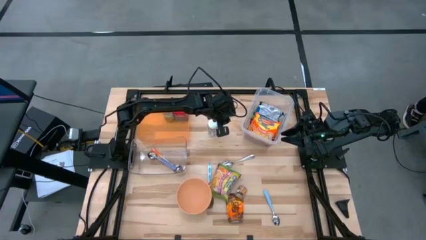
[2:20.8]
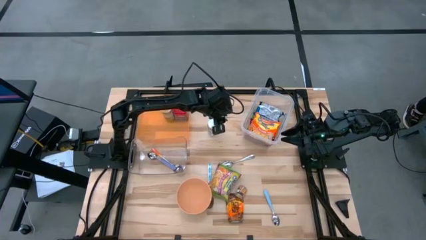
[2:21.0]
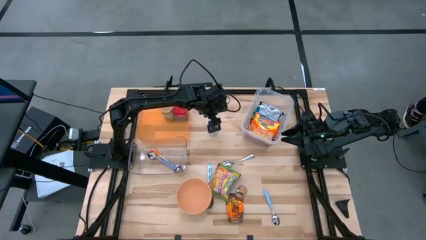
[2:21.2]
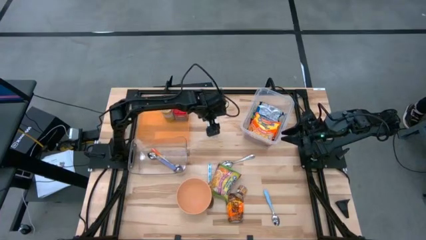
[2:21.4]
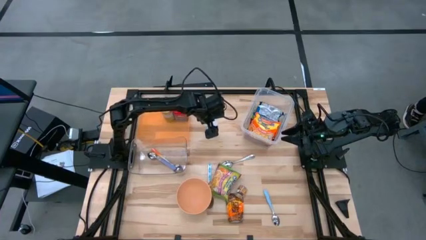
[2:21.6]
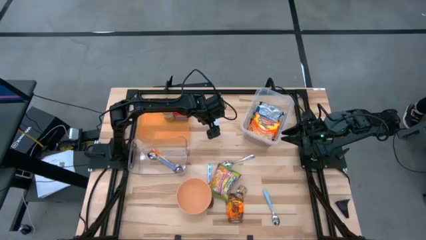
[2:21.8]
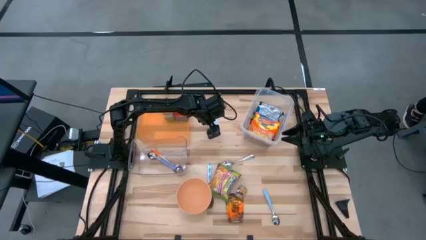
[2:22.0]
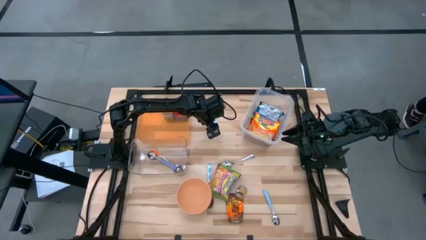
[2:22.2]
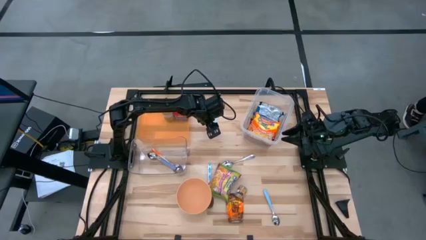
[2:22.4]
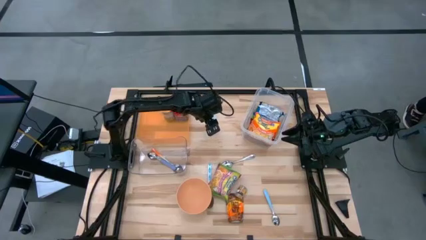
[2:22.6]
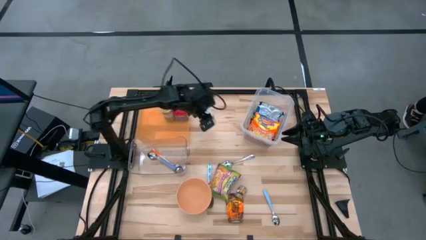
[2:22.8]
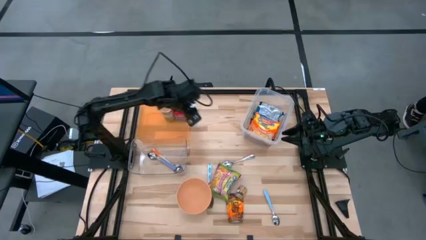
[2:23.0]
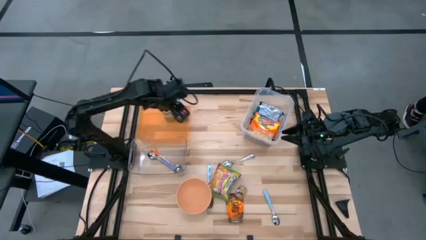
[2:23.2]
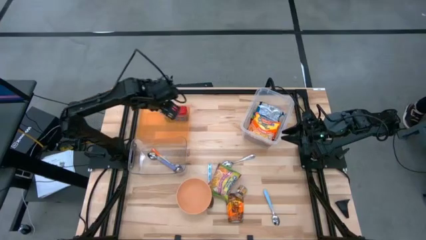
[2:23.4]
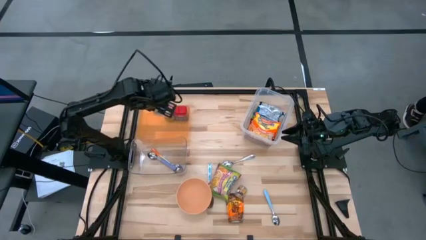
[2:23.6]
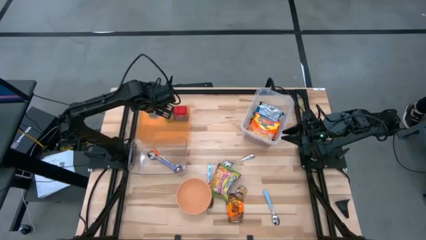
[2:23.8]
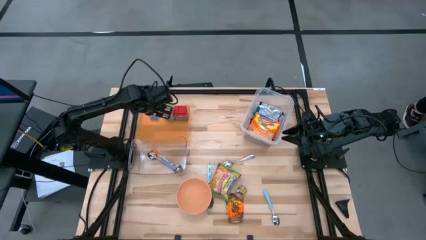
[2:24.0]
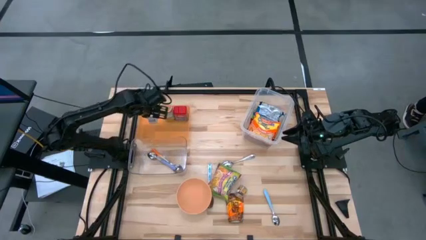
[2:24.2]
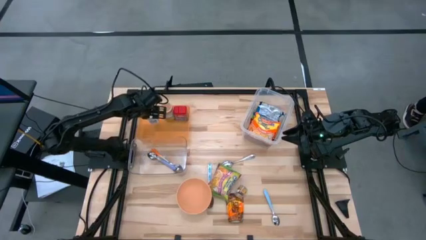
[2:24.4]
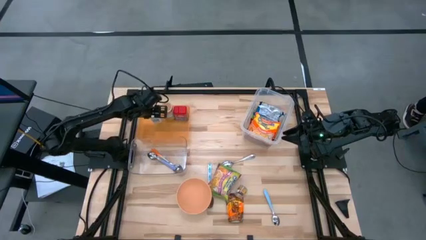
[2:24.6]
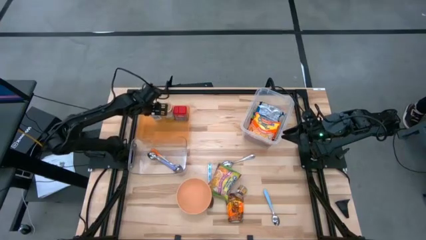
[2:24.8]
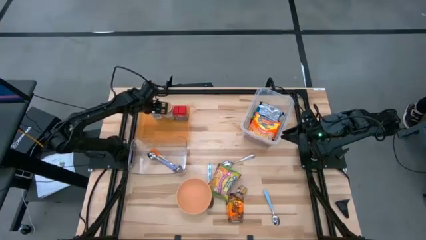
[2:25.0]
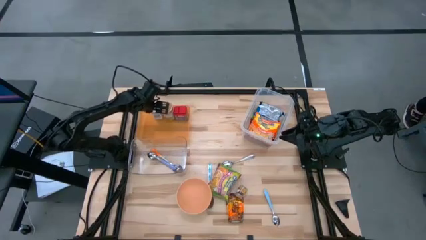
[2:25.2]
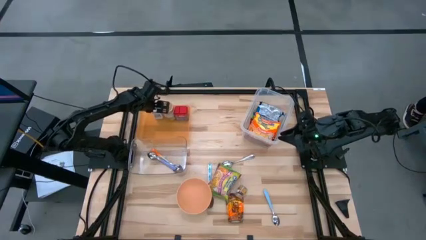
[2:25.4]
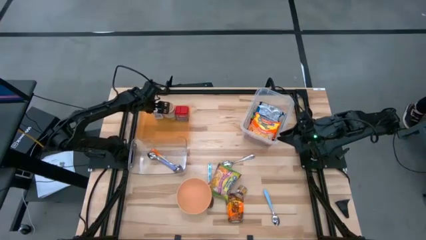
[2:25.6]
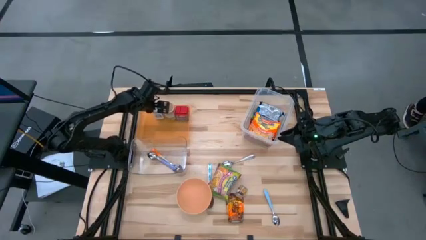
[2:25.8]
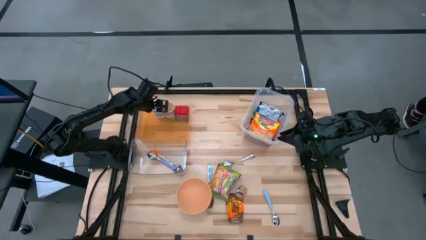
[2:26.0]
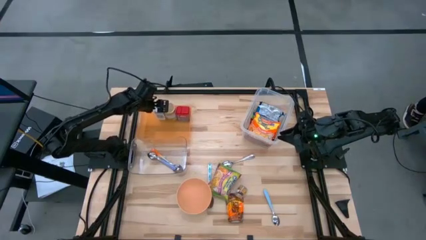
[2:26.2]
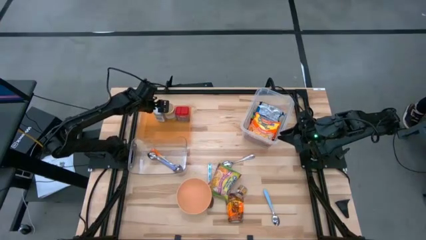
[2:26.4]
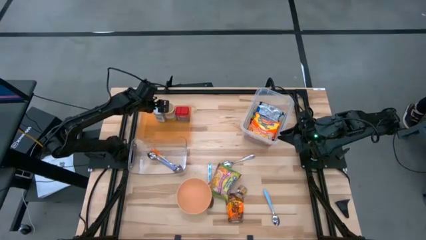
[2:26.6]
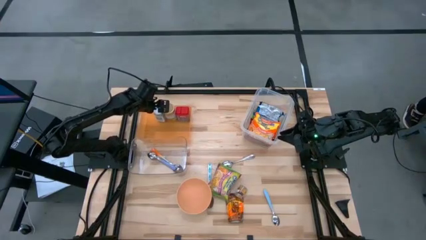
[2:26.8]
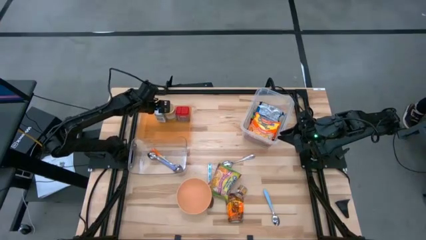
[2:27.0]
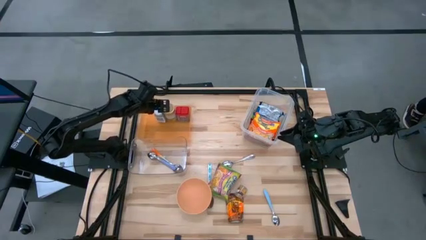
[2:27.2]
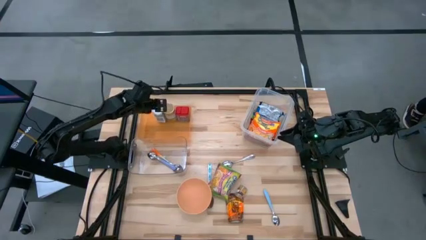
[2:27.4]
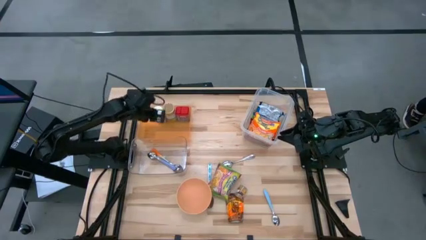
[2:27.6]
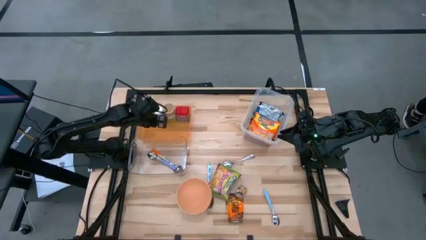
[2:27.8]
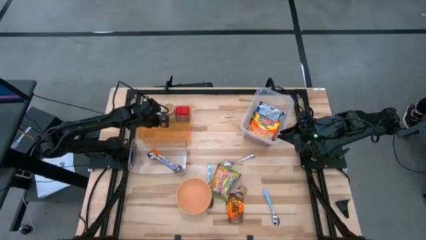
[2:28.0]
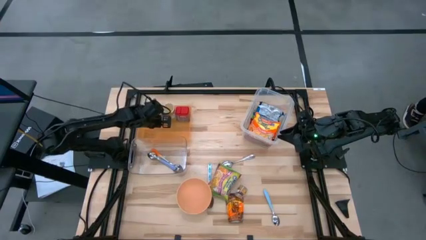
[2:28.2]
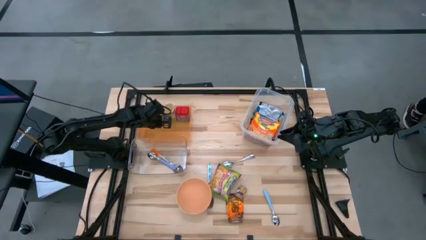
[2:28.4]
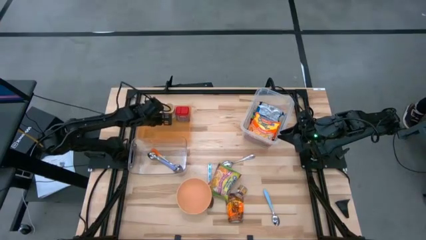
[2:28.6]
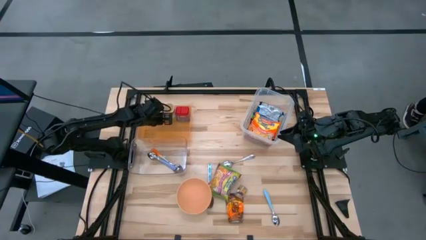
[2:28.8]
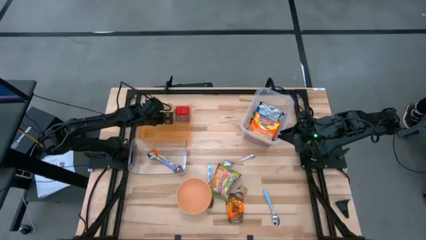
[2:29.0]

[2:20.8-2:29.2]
Task: Pick & Place Food Item
Put the white seasoning bottle into the orange bin

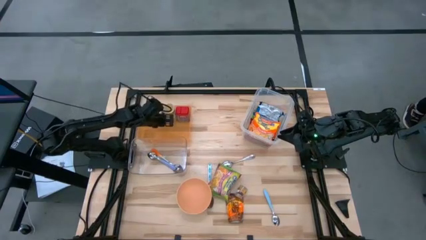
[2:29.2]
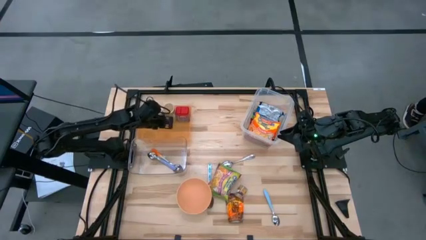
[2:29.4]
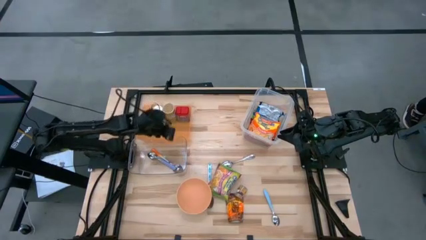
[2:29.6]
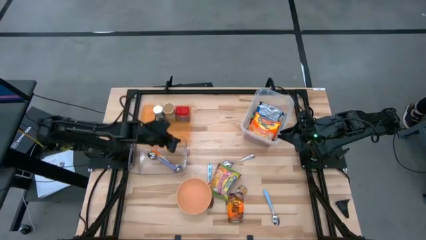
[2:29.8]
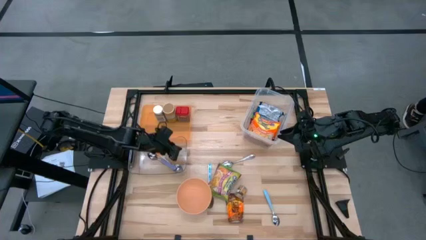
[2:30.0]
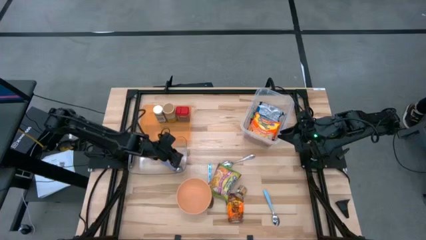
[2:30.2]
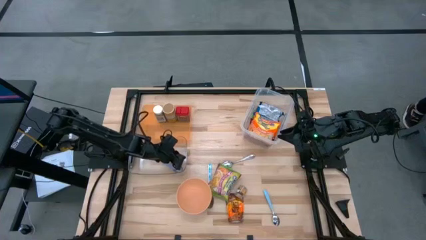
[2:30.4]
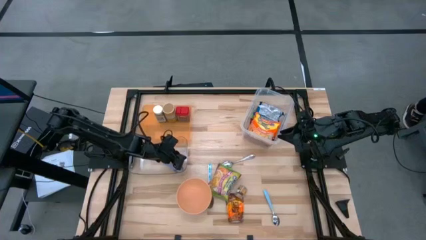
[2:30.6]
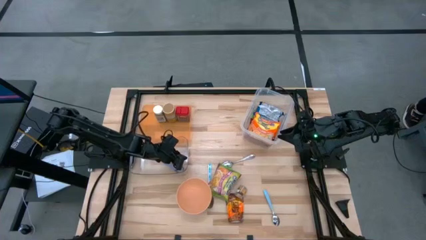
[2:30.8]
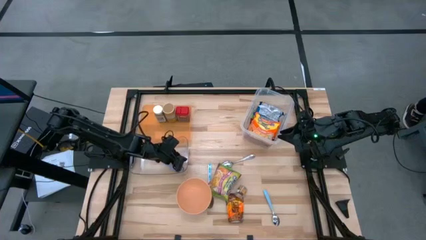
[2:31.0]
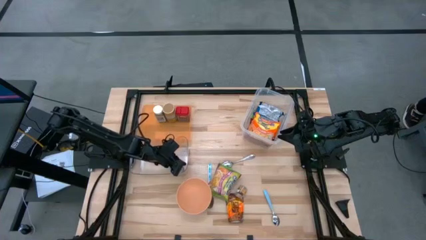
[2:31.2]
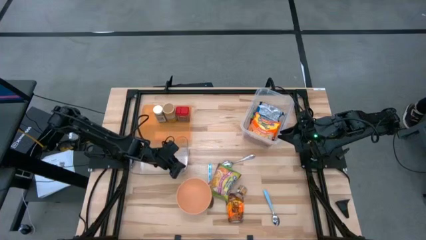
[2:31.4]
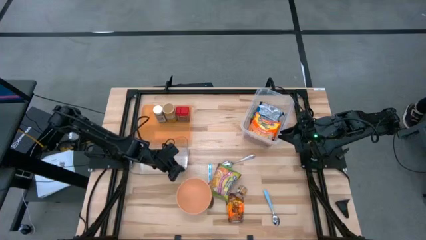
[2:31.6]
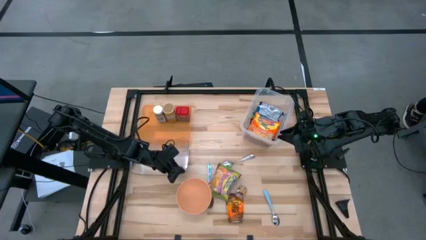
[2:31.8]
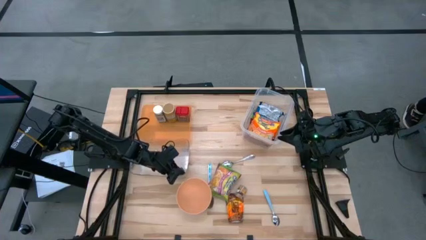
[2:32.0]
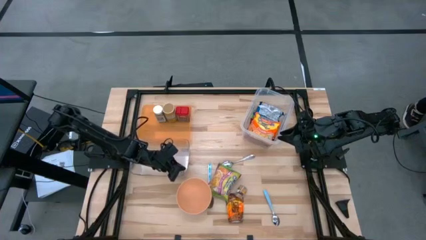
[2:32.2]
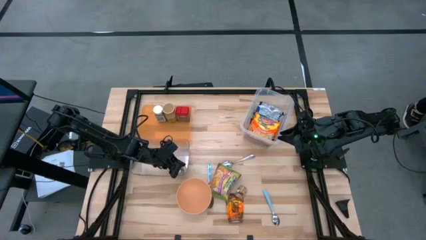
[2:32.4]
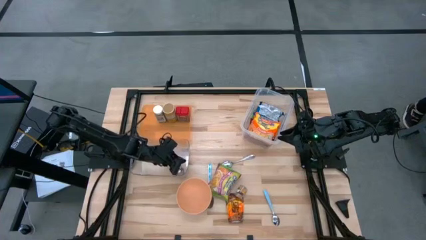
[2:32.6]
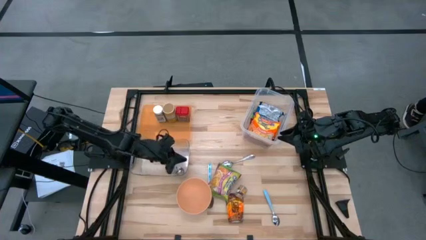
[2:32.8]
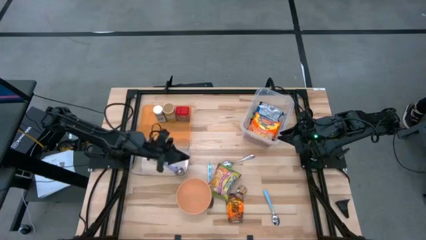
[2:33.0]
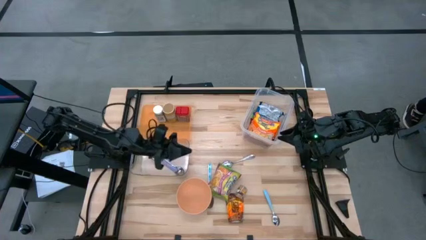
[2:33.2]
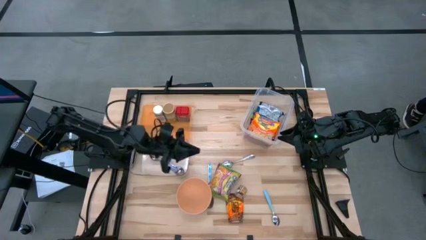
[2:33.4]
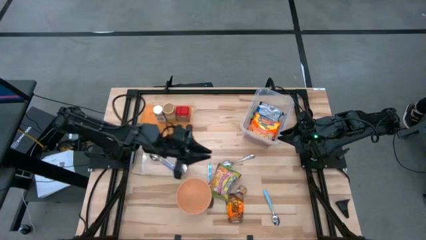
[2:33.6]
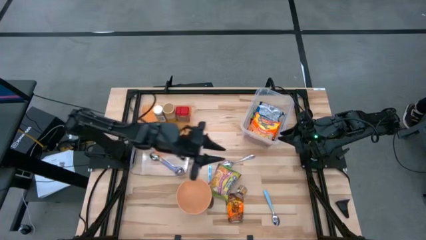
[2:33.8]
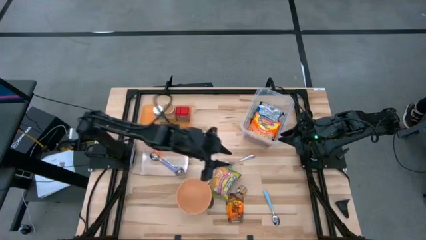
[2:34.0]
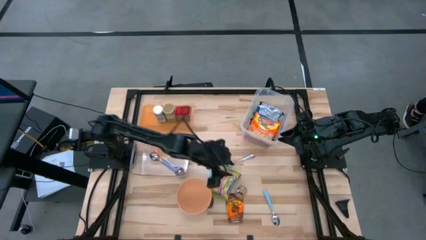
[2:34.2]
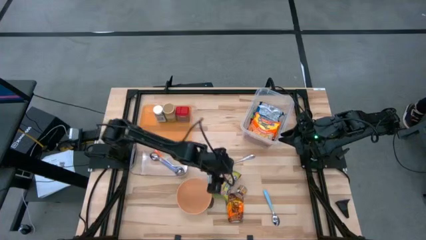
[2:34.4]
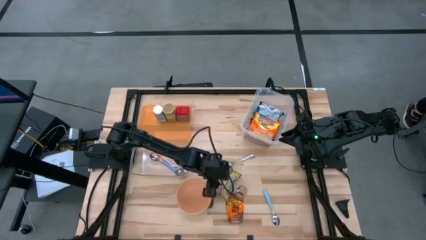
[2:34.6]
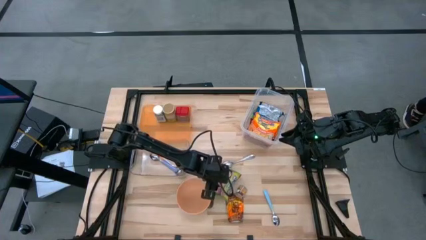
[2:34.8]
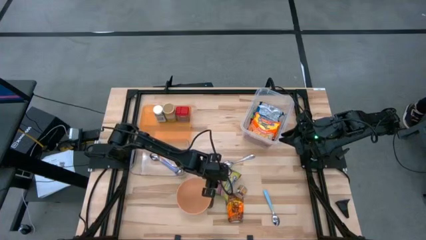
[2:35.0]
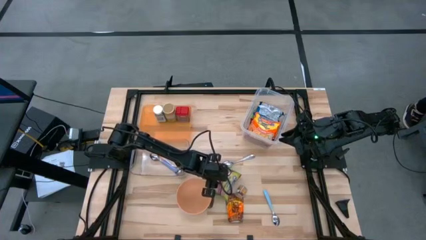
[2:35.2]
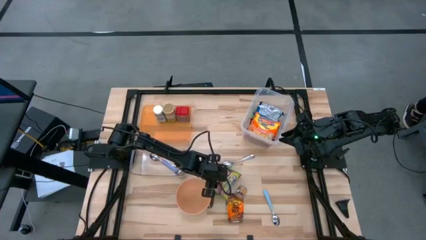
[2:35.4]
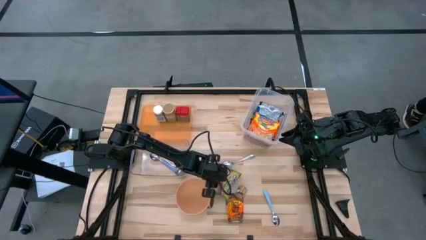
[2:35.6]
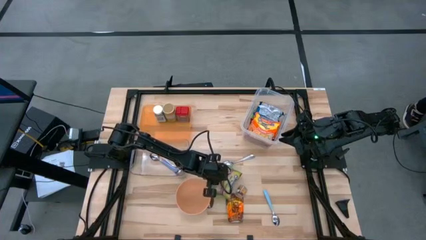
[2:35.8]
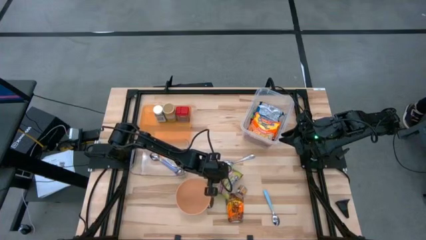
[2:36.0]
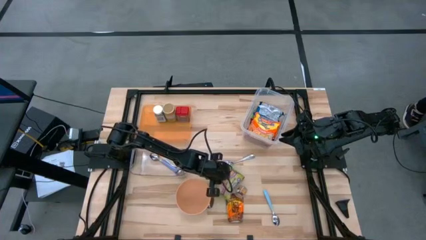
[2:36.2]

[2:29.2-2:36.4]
Put the green noodle pack into the top transparent bin
